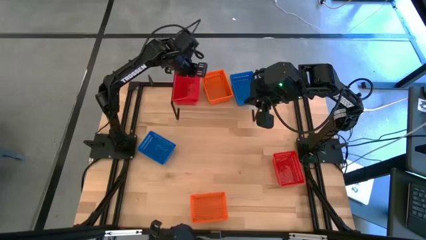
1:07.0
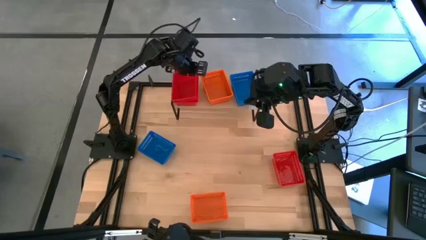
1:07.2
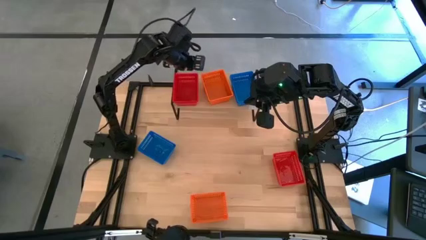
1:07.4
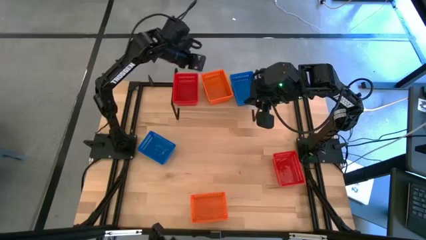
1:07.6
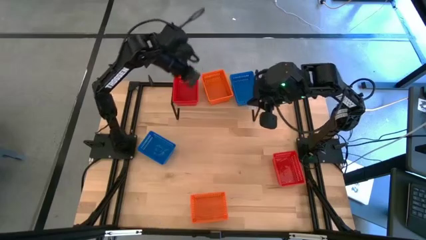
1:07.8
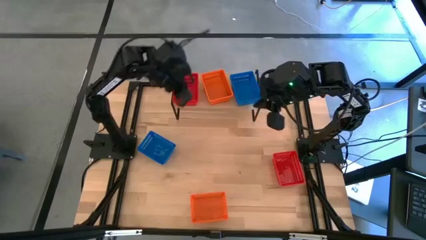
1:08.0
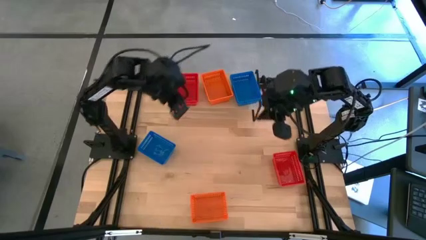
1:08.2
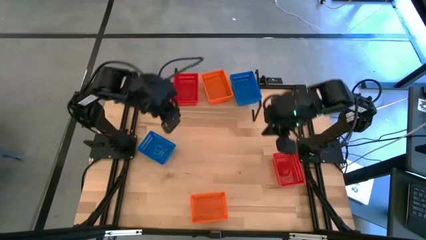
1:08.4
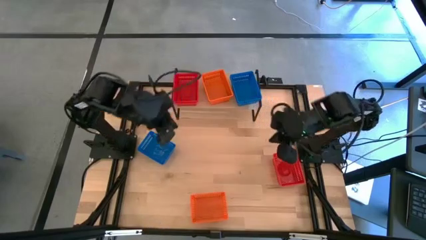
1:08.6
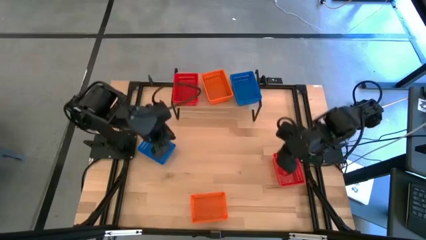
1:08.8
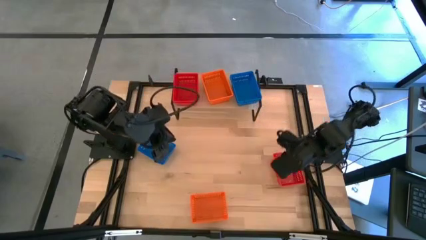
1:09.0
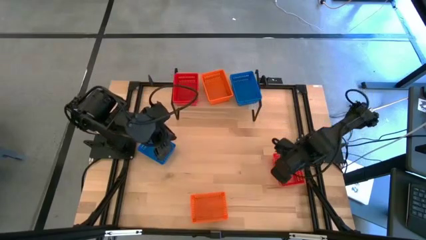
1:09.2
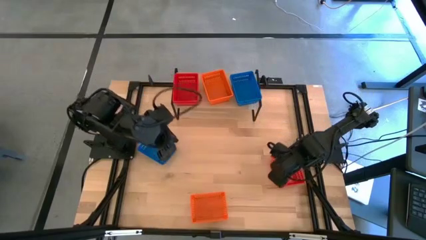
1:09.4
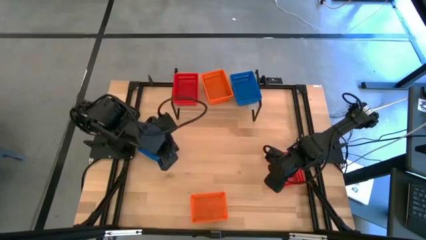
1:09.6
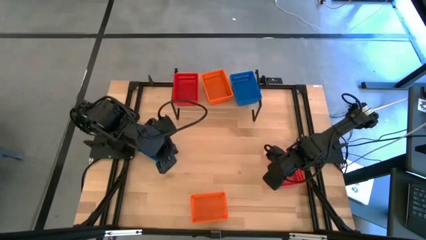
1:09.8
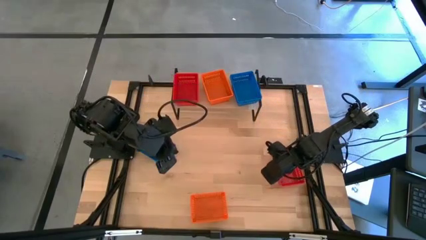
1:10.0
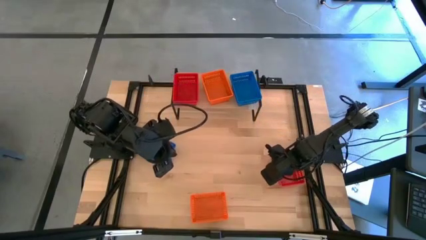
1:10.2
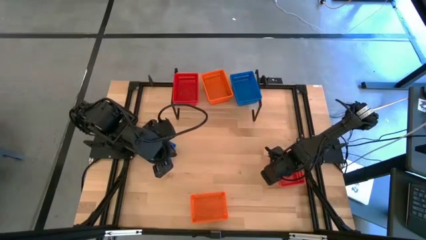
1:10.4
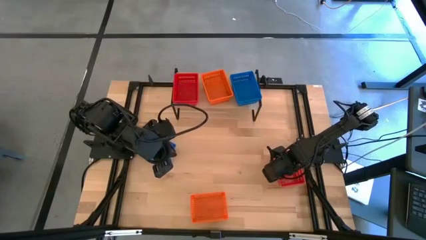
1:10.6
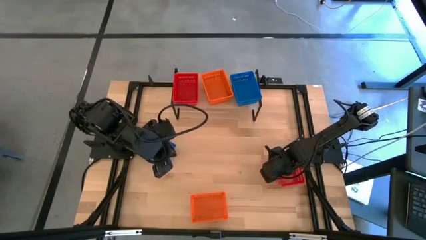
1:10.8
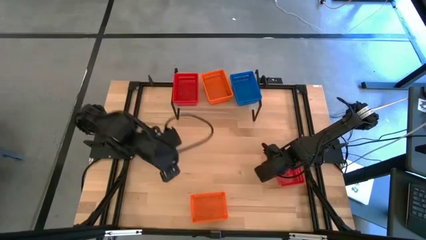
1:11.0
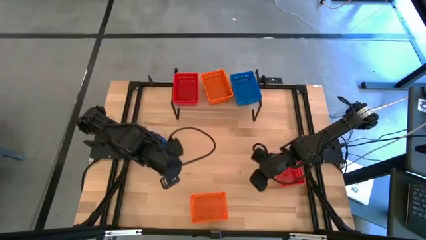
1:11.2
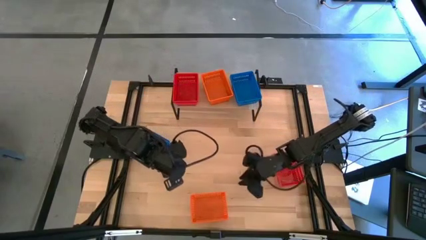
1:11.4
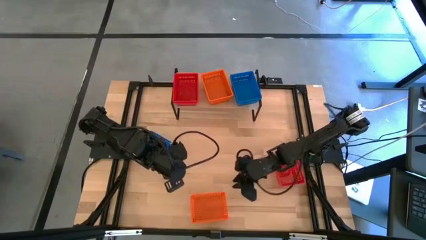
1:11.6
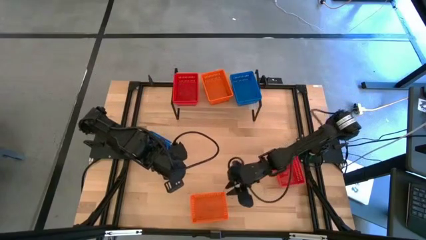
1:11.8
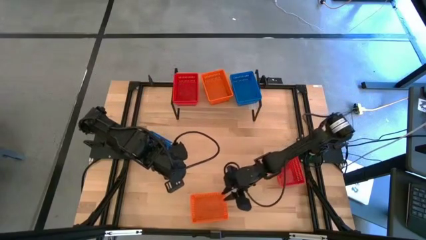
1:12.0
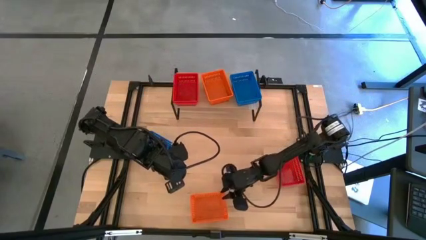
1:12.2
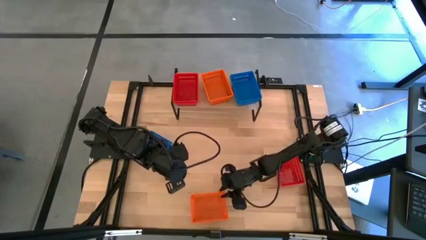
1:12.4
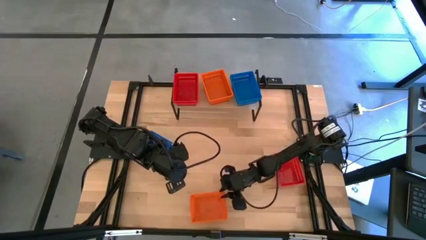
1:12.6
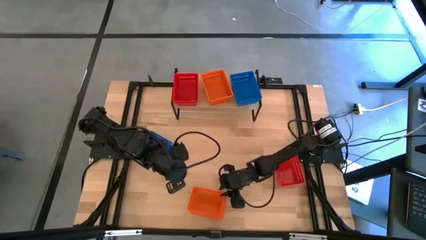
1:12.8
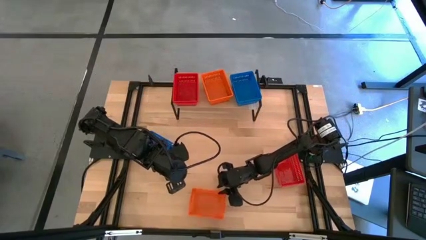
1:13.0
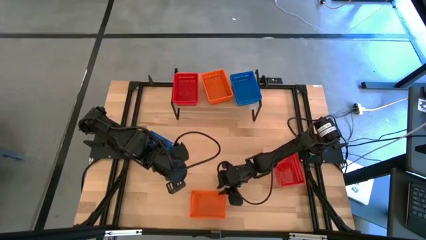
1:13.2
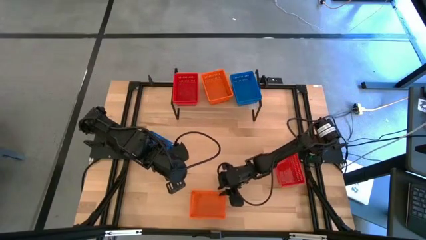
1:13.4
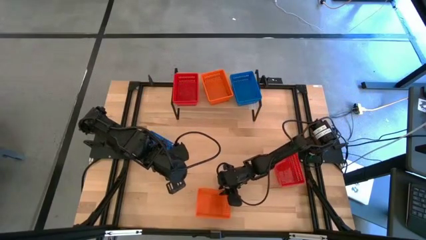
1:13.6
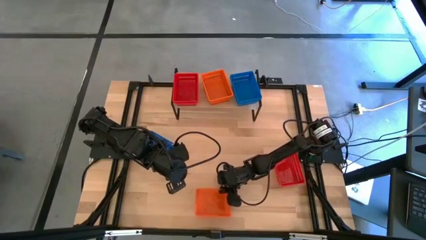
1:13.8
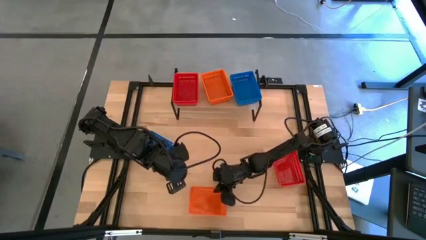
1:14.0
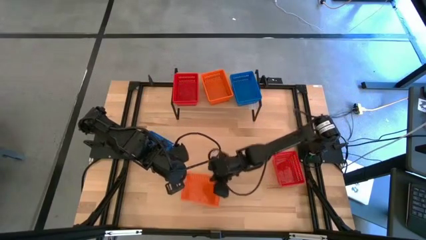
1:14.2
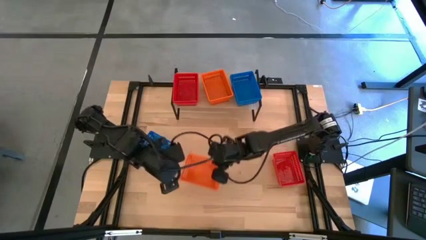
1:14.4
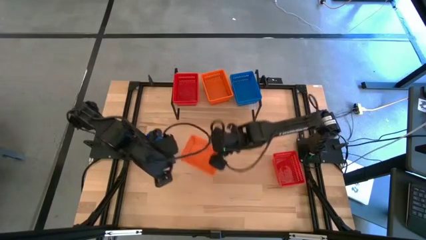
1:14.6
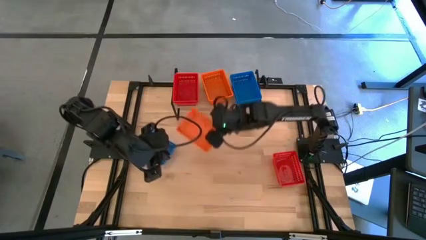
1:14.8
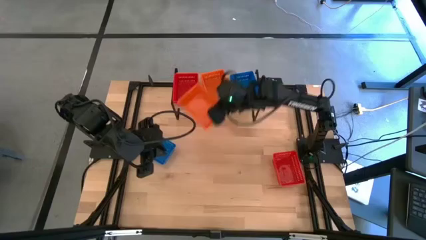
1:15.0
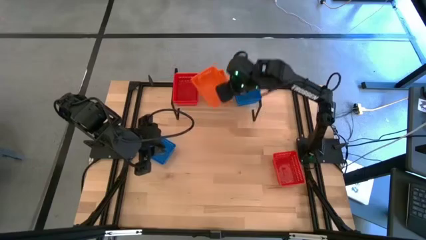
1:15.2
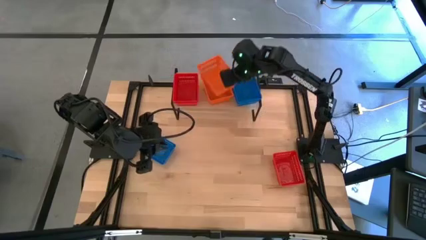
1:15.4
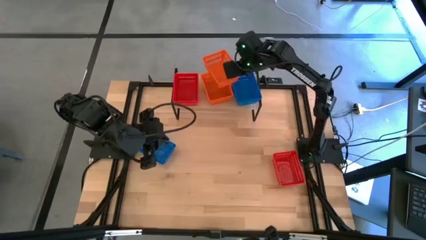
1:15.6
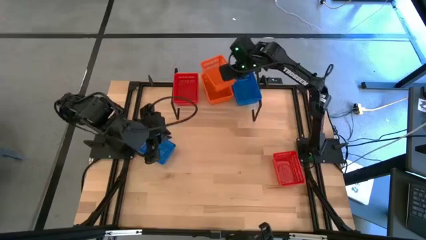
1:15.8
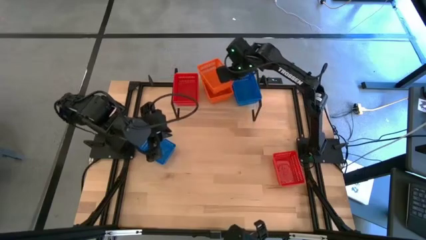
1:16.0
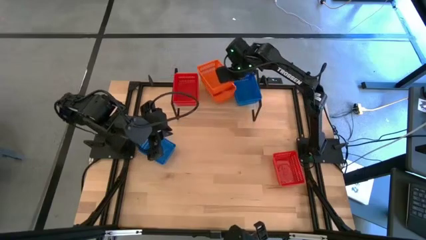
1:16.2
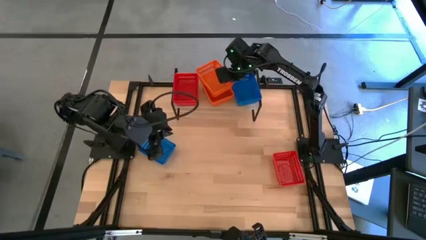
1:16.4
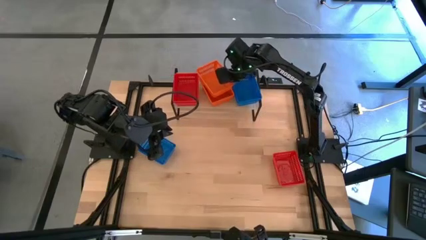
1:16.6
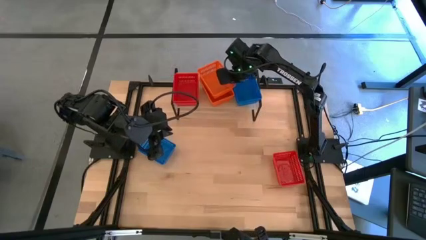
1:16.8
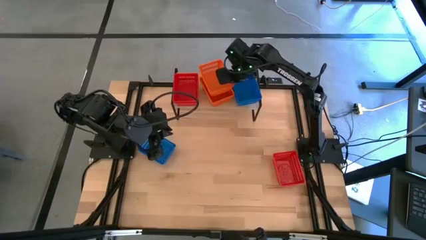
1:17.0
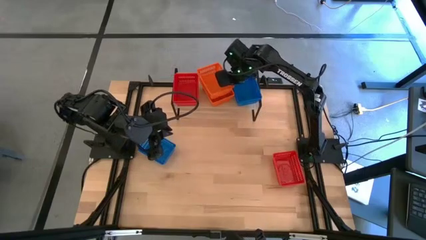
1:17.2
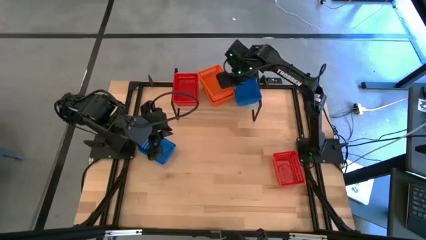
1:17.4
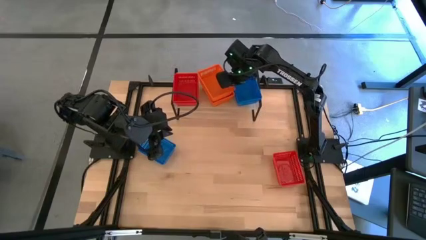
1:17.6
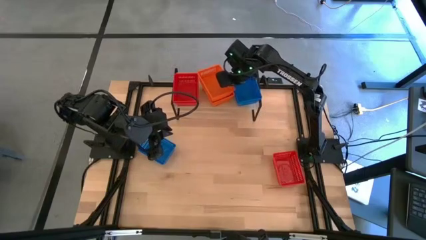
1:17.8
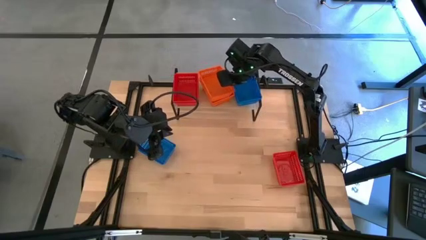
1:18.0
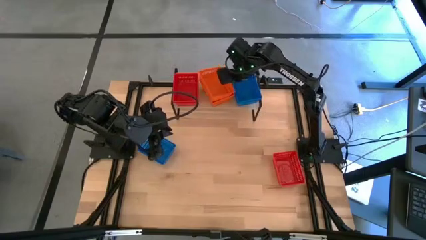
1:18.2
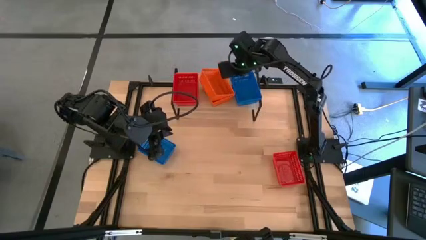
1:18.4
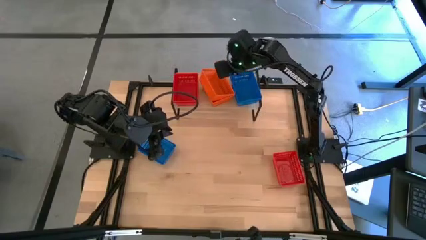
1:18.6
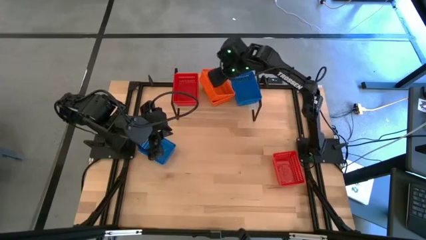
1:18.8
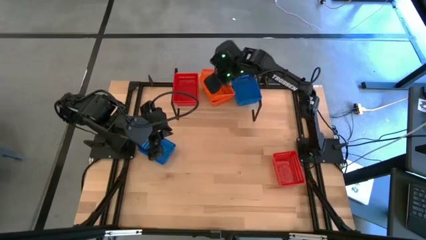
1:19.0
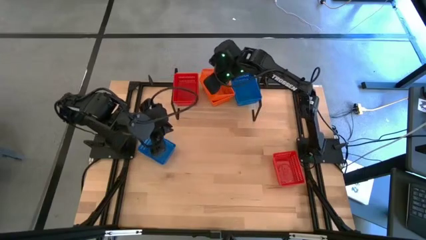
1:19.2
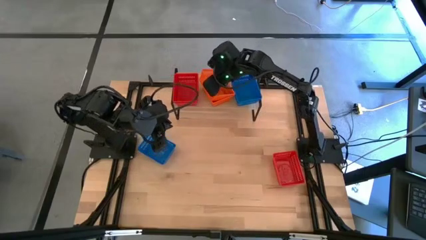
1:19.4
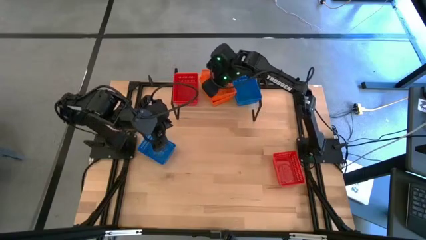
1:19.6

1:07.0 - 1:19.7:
Task: Stack baskets on shelf by color
Stack the orange basket into the orange basket on the shelf
